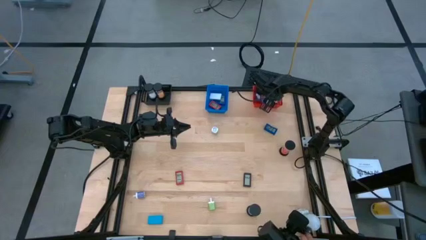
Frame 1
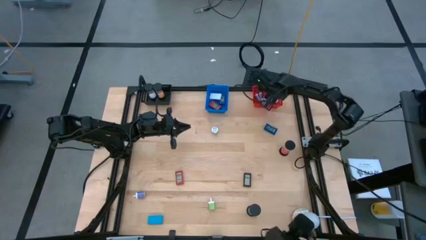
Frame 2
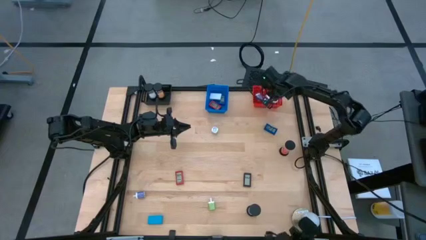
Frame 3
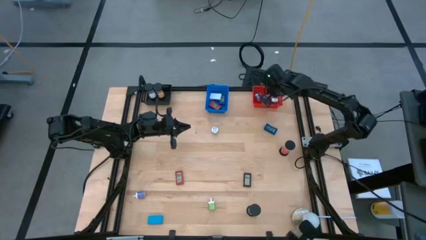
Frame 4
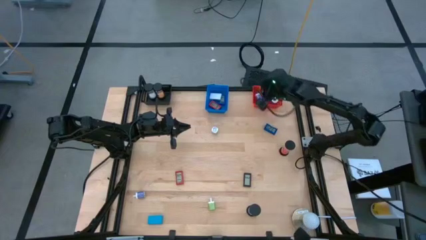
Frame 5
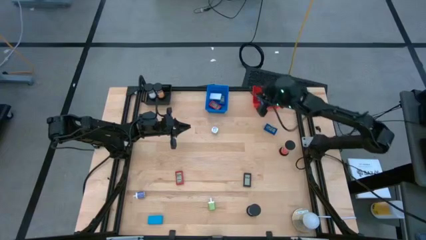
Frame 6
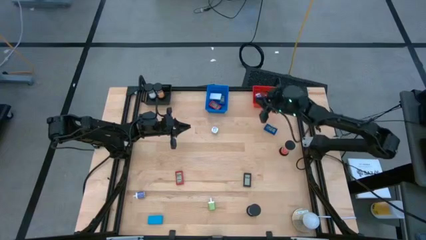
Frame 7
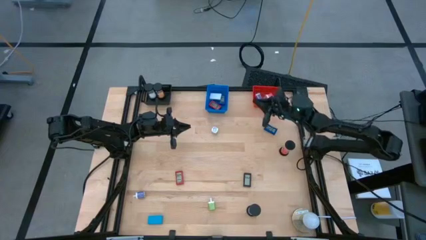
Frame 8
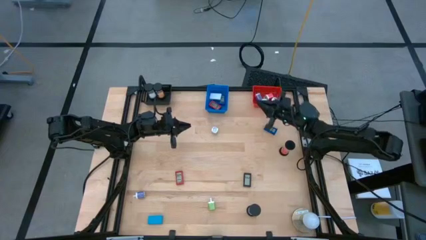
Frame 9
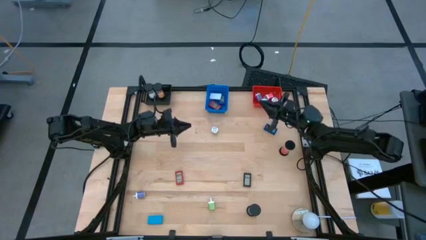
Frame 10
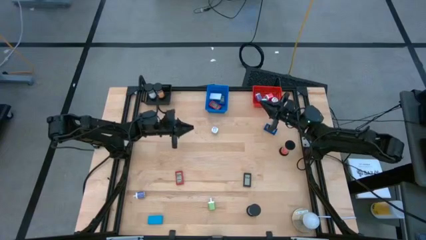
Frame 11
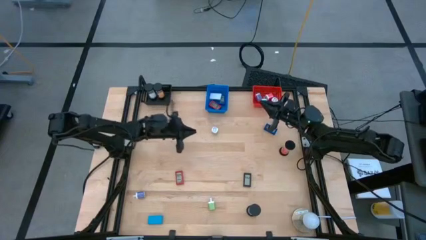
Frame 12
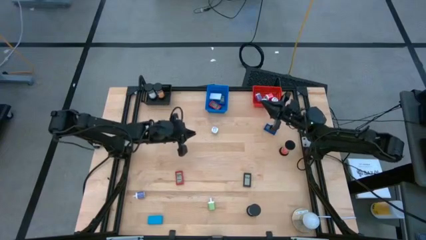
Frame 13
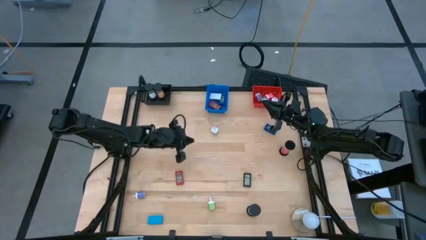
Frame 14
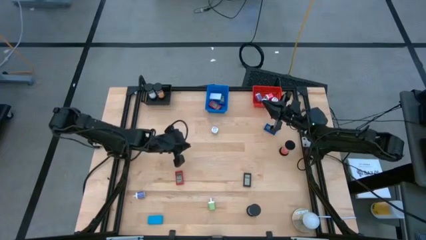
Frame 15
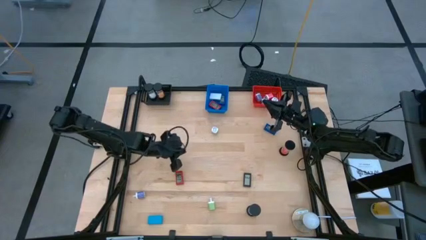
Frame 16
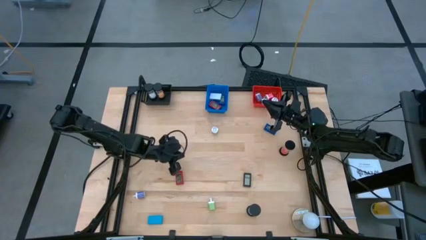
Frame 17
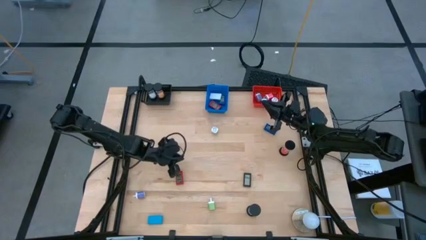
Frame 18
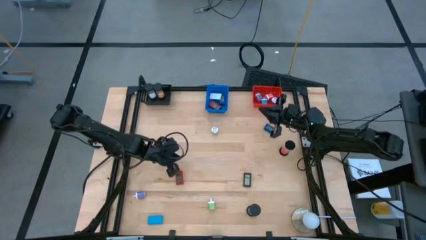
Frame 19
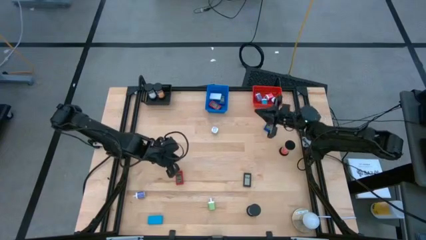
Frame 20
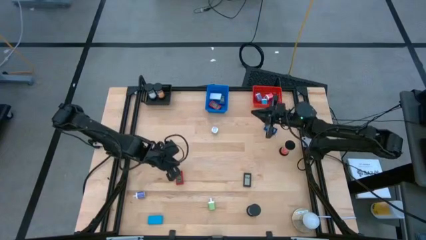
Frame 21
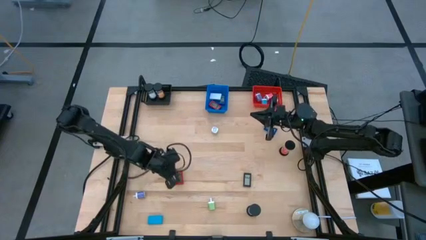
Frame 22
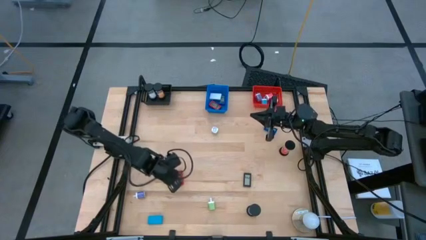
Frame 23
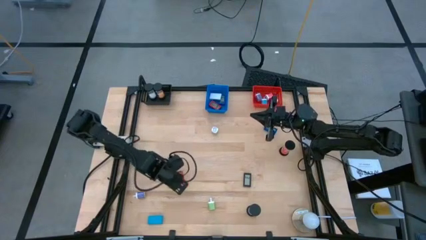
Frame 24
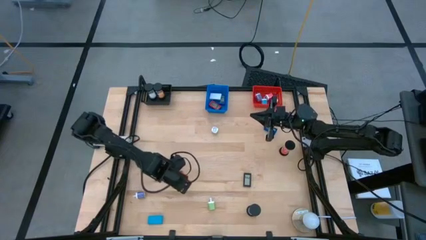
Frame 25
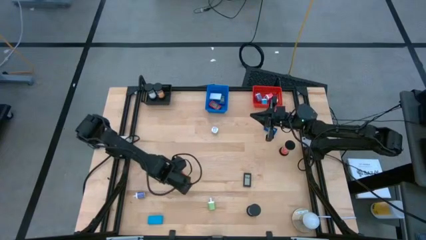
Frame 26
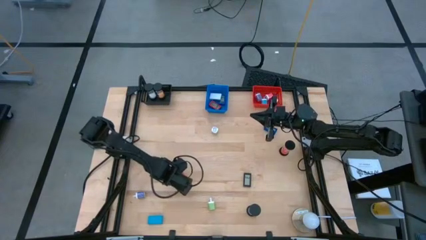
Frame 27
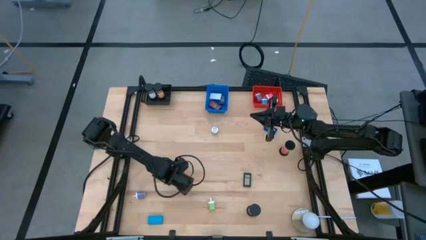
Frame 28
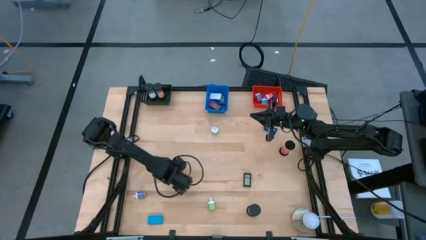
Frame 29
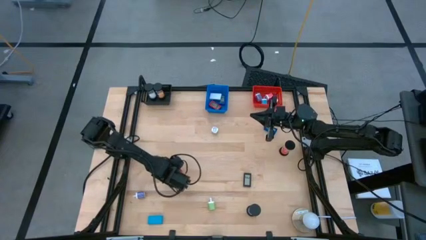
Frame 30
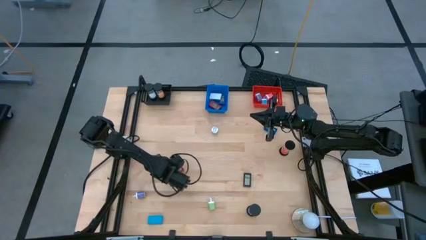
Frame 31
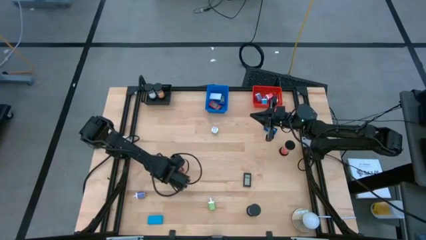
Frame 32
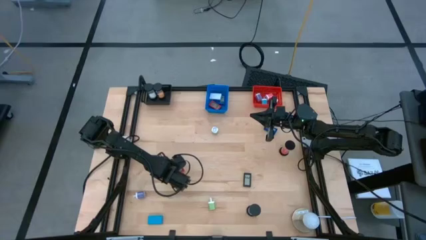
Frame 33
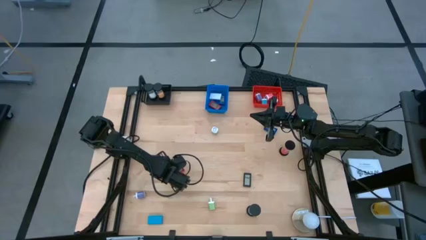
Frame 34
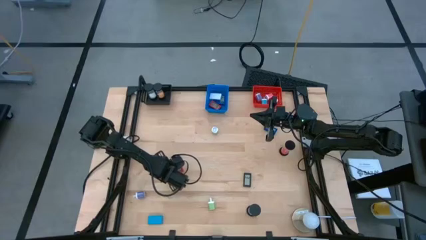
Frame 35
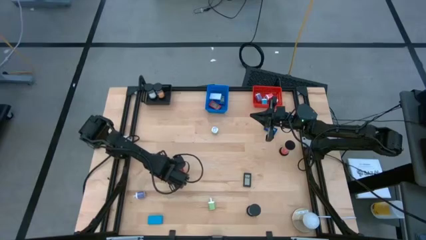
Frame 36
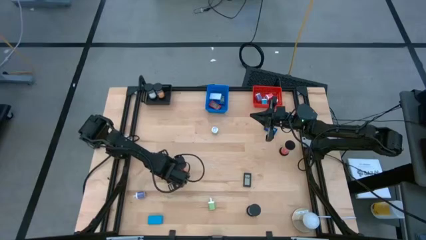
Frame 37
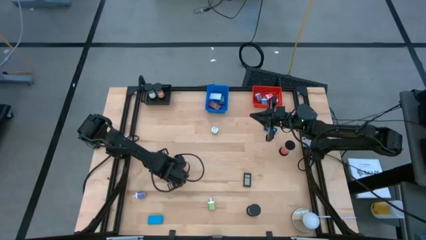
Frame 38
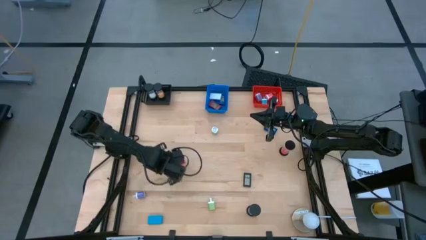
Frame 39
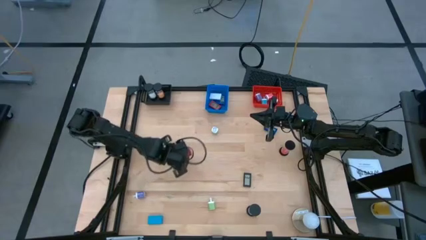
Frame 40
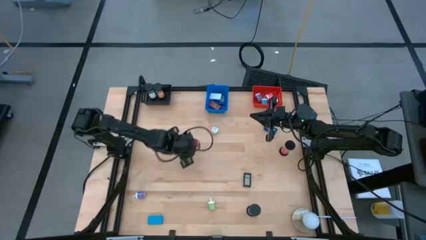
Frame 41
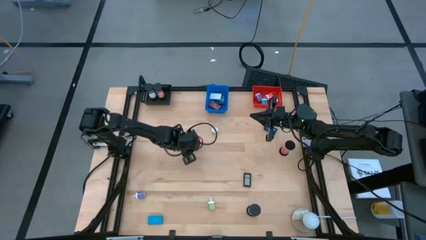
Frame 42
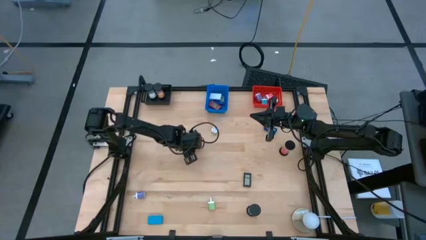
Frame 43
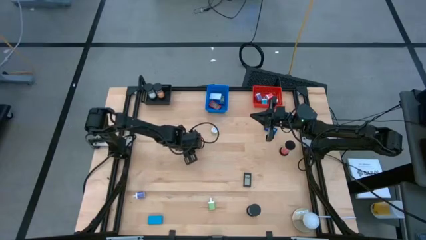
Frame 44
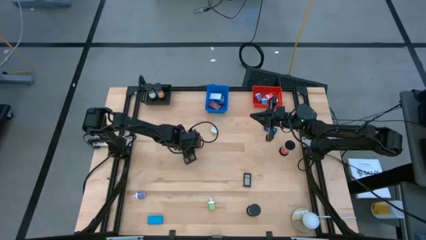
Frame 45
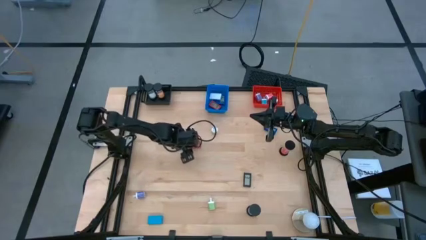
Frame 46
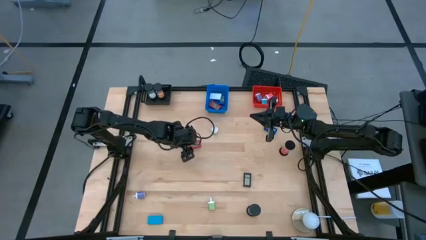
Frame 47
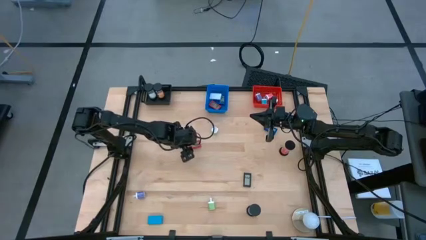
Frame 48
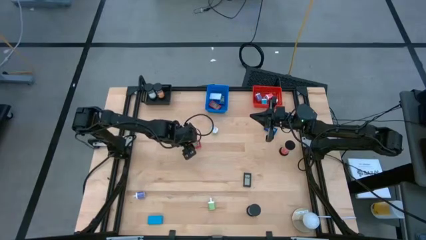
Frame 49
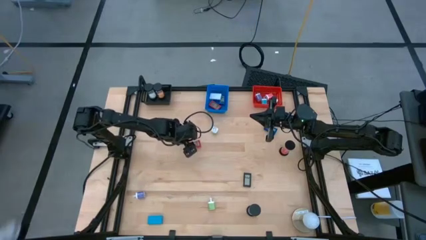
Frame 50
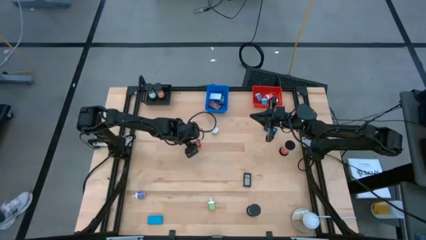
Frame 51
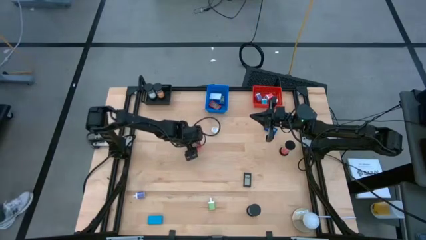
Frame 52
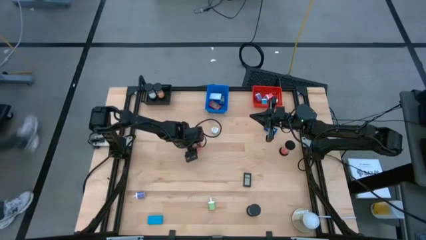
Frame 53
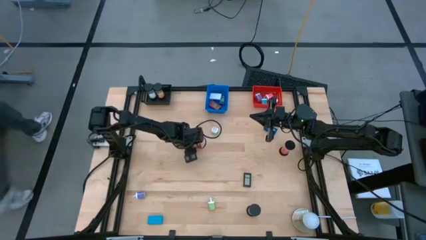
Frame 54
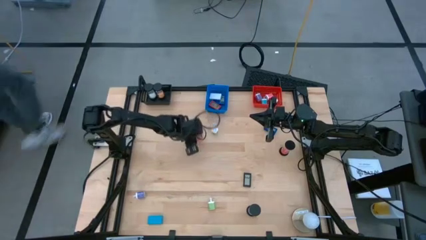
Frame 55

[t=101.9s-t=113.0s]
Task: Pick & Place Office items
Put the red digital clock into the blue basket

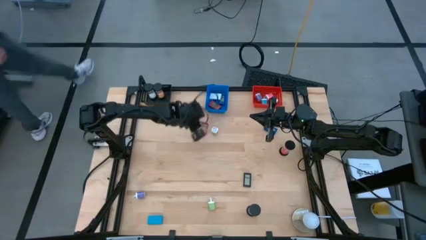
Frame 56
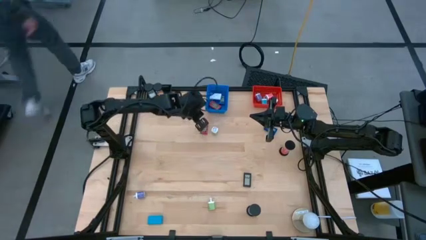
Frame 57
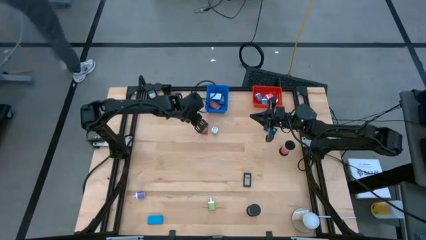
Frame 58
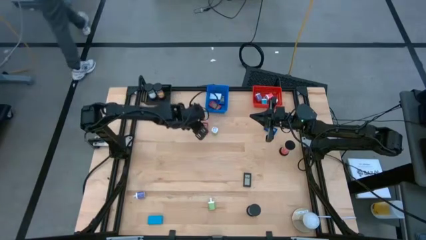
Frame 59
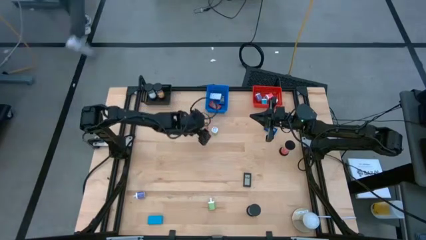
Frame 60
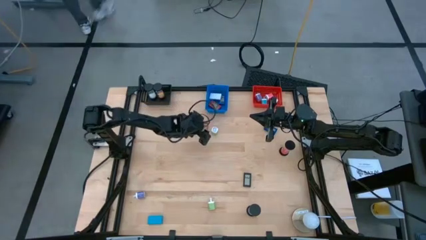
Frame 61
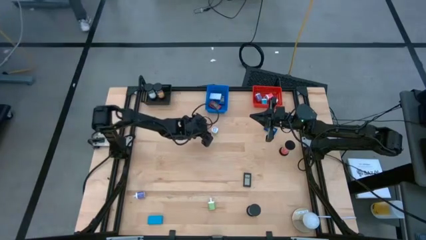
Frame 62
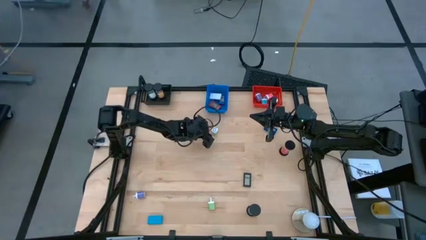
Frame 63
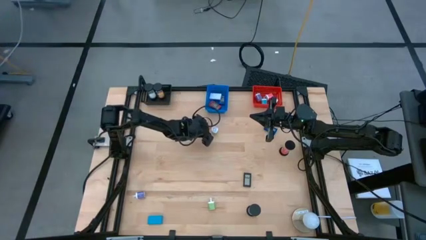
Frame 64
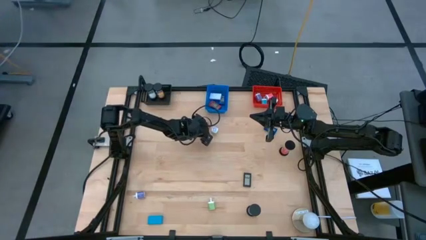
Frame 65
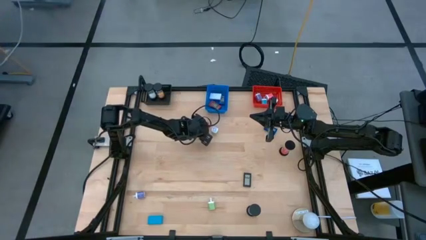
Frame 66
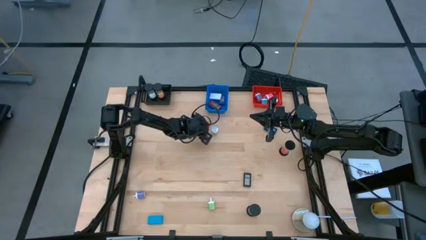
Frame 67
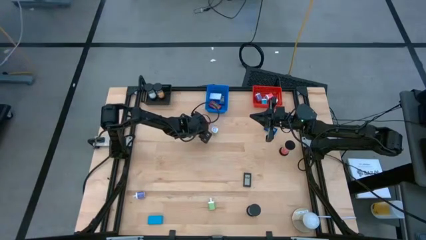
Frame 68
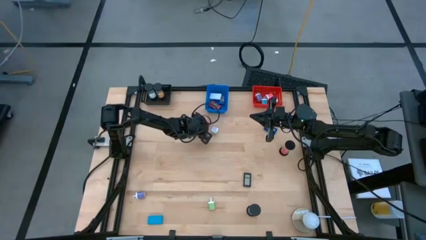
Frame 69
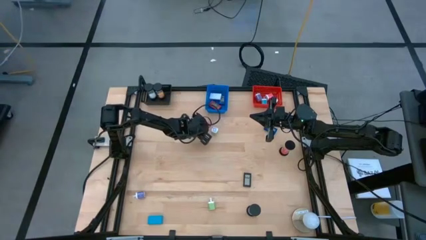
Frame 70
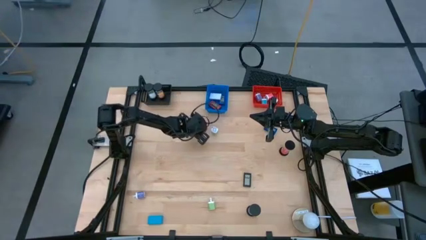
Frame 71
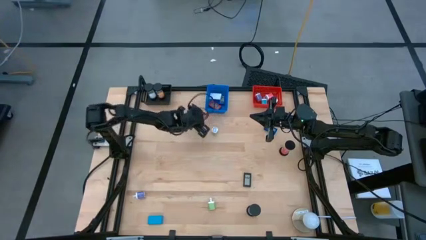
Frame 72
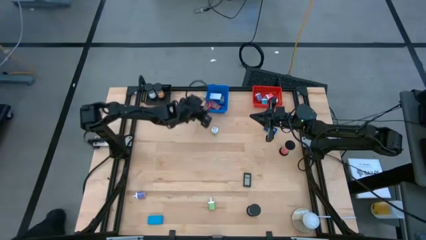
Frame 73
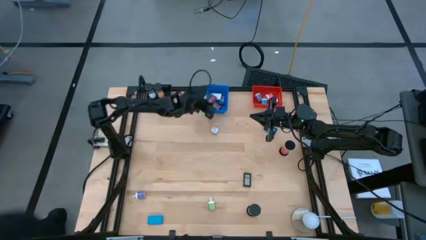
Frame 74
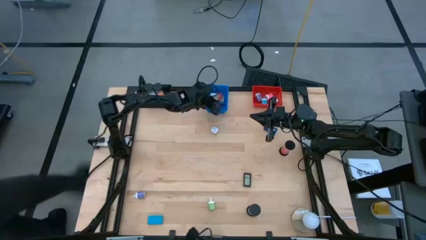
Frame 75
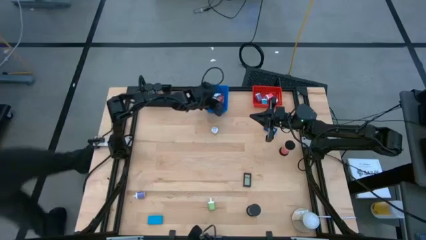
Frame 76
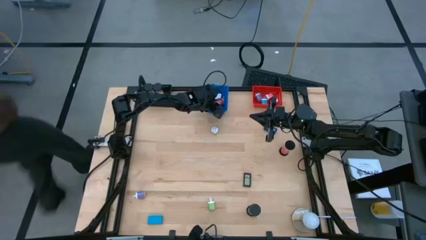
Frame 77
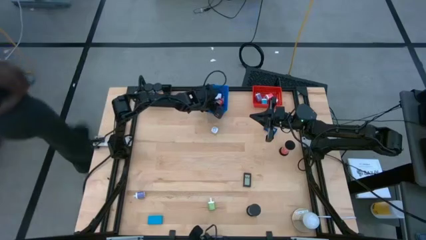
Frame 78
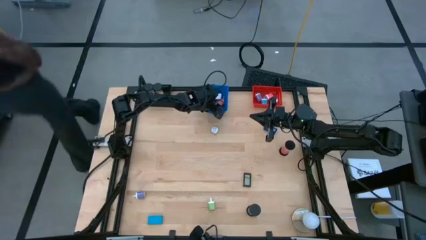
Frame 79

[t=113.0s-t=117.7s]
Put the red digital clock into the blue basket
